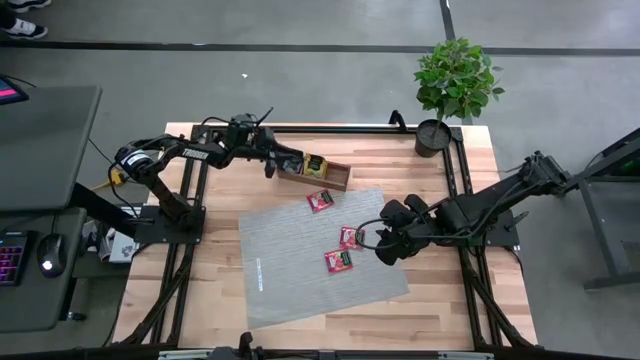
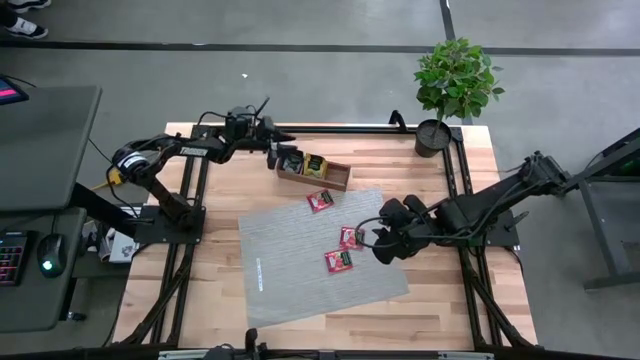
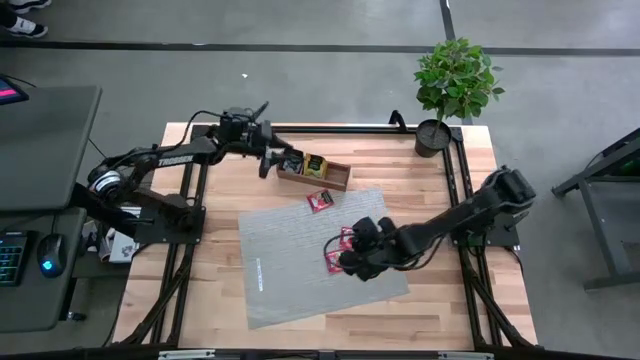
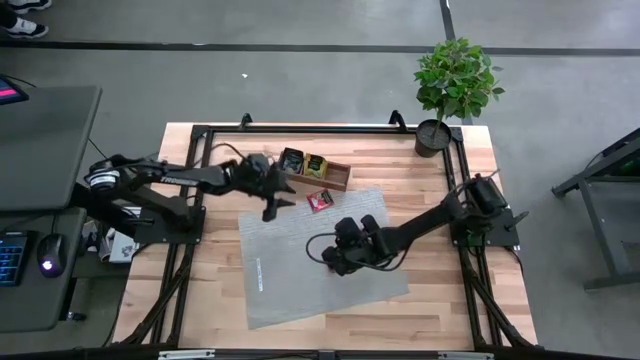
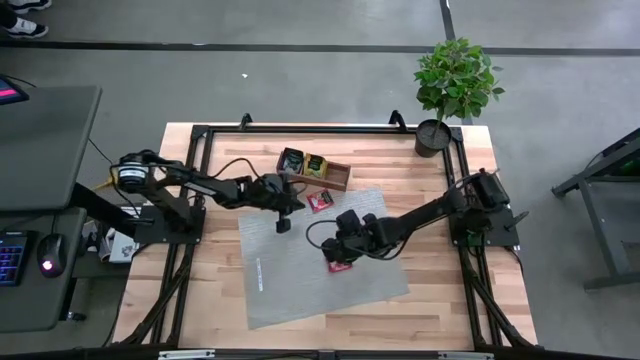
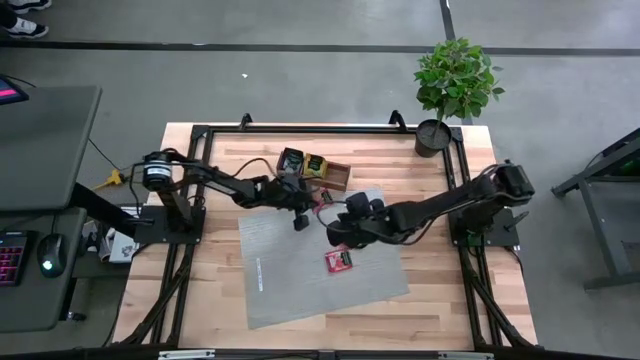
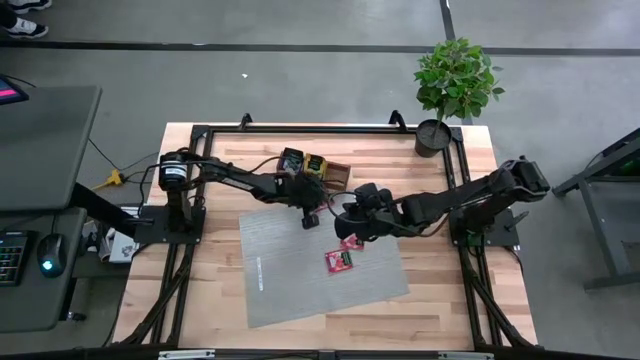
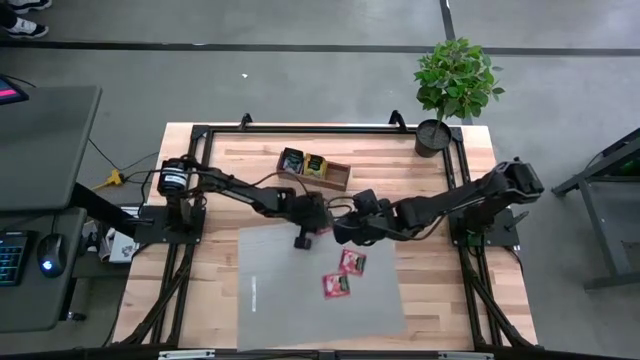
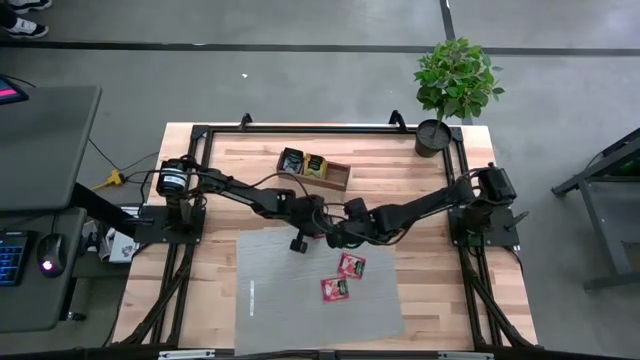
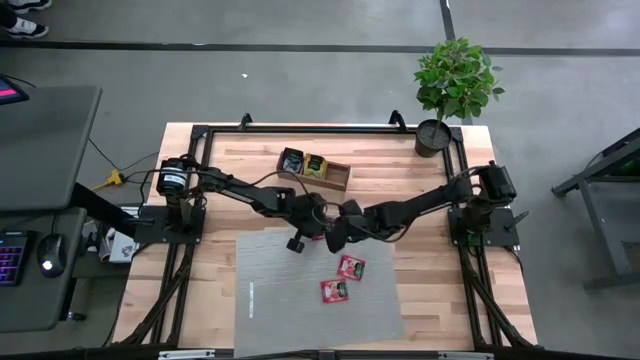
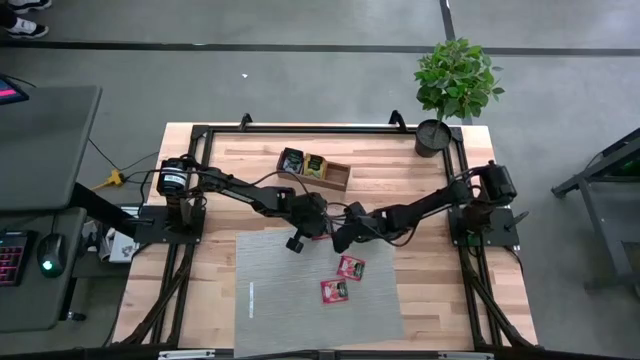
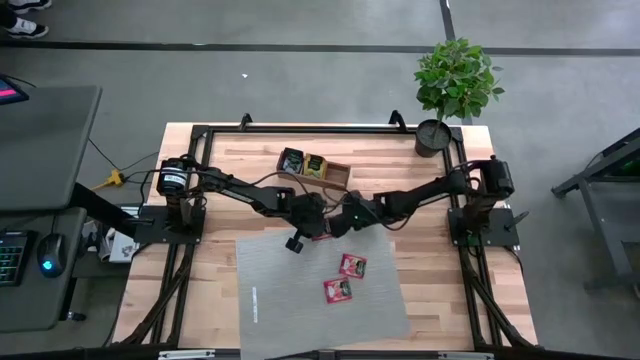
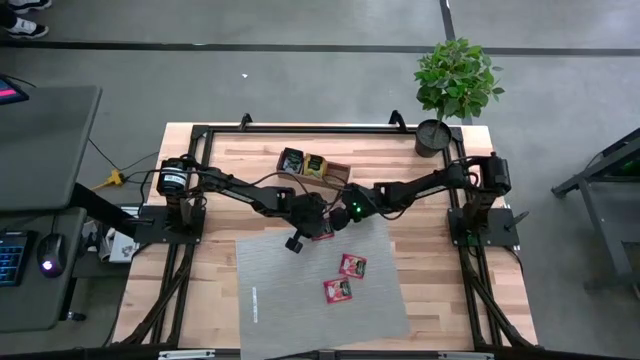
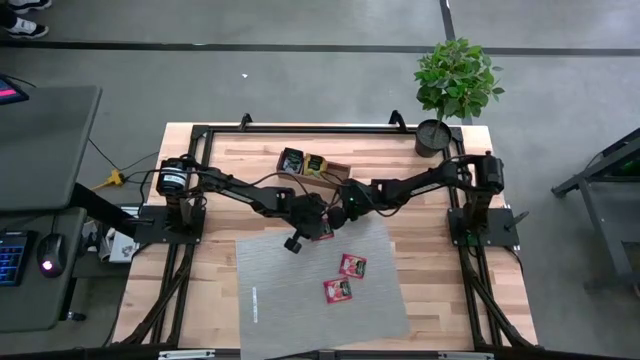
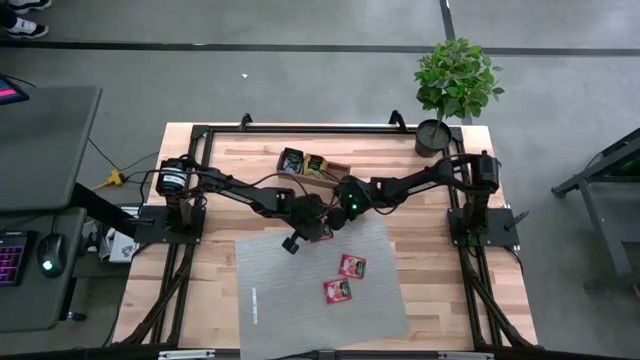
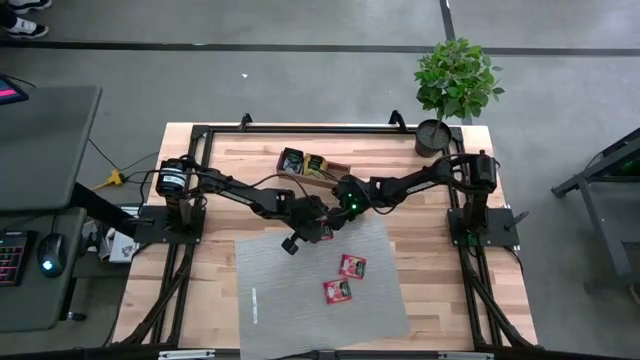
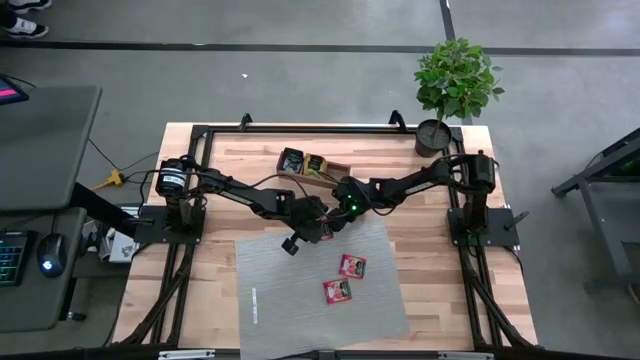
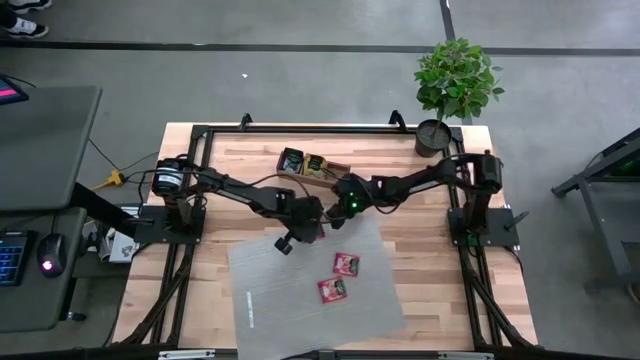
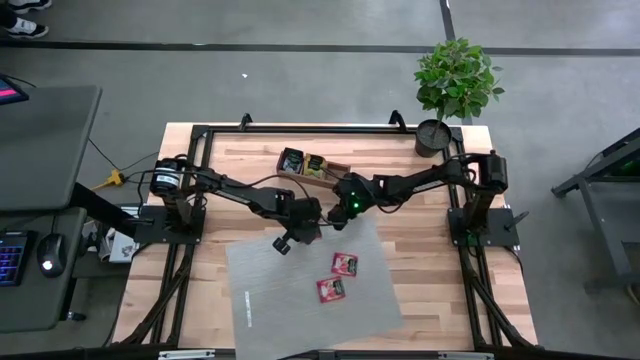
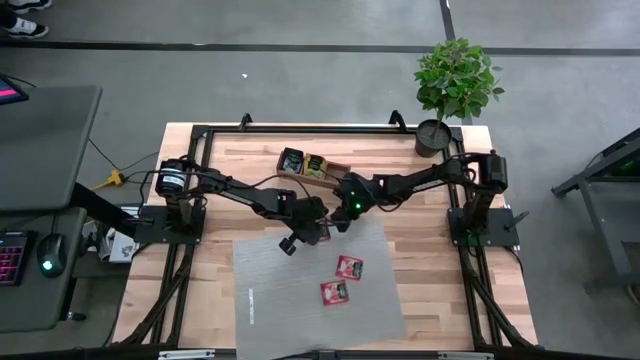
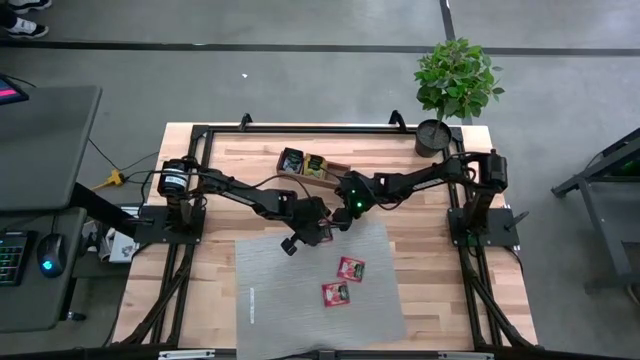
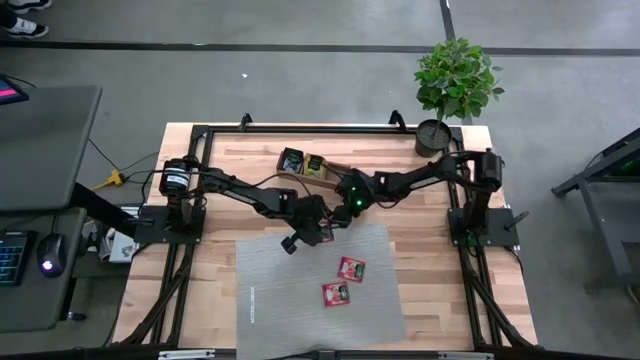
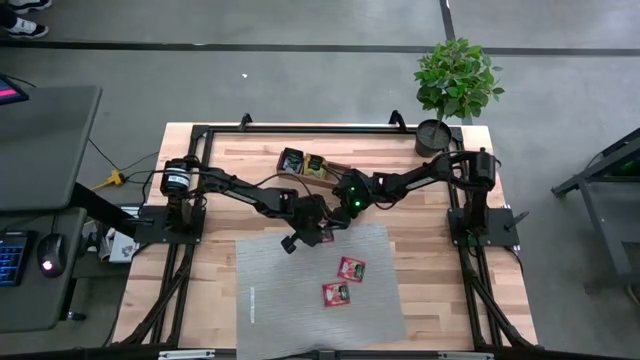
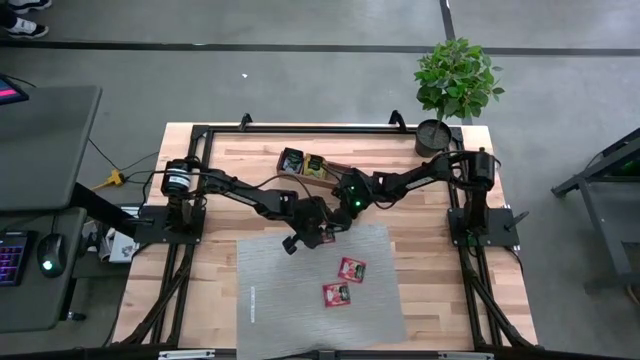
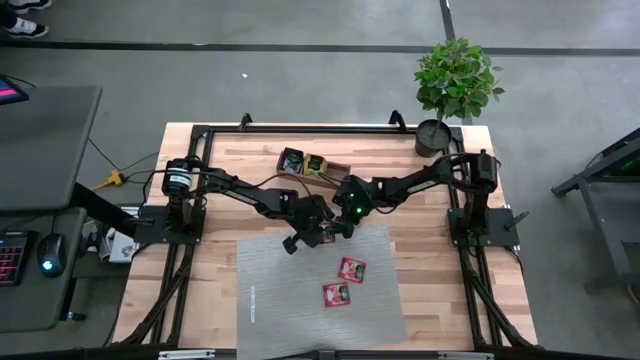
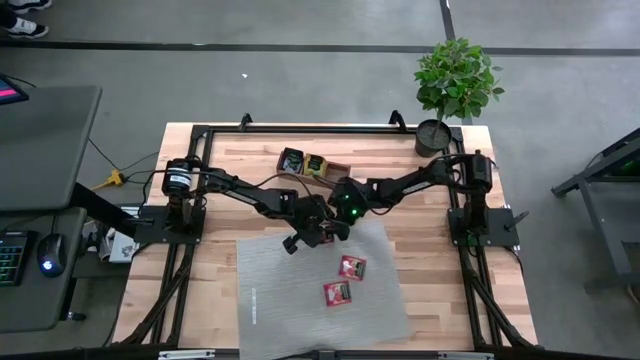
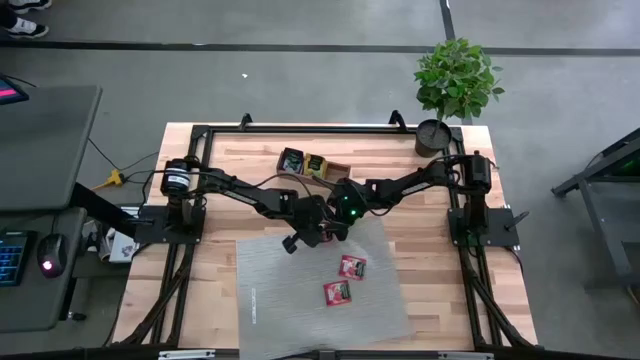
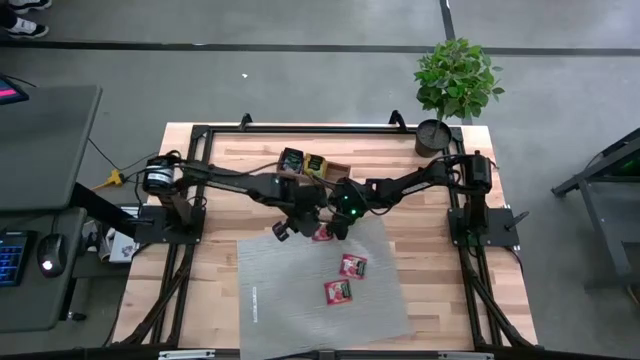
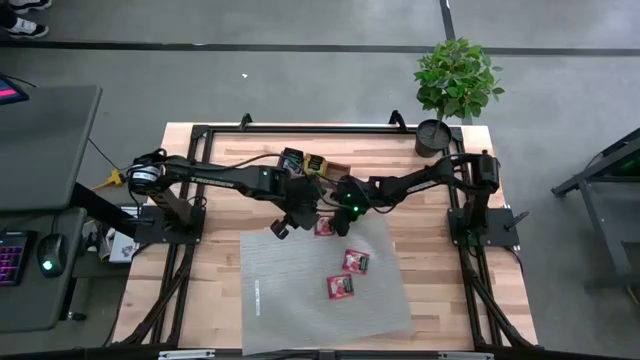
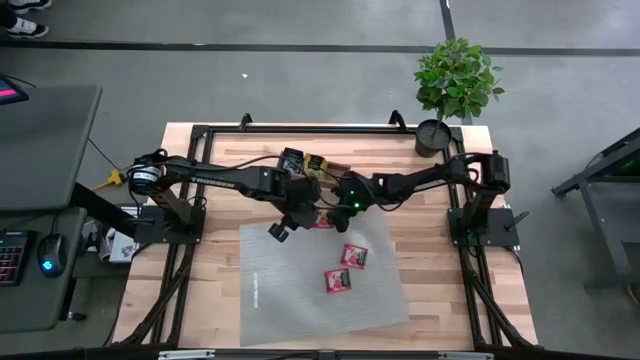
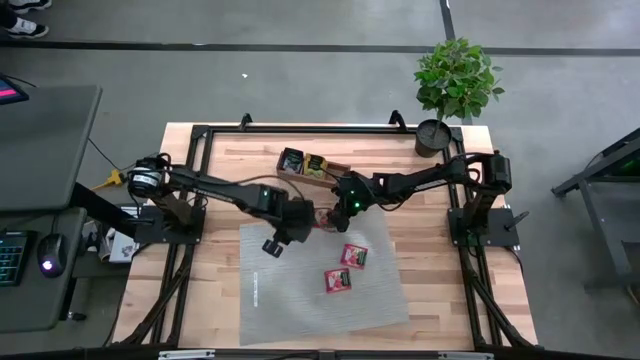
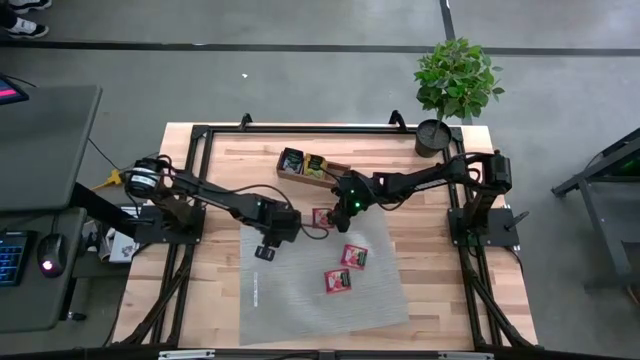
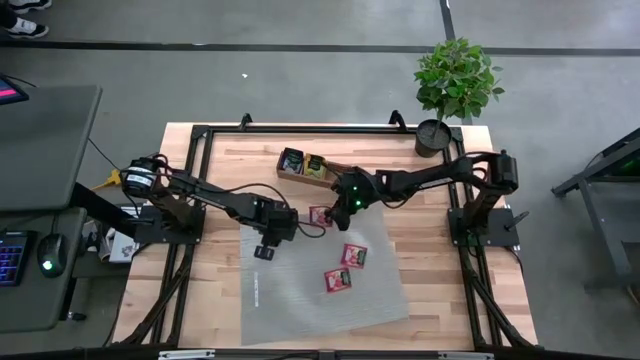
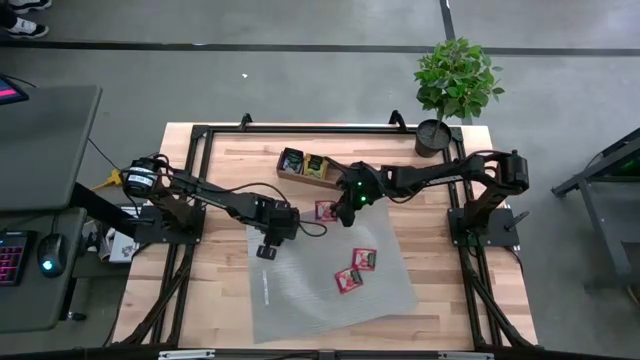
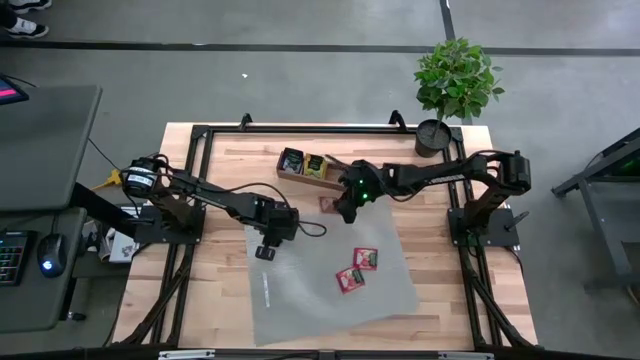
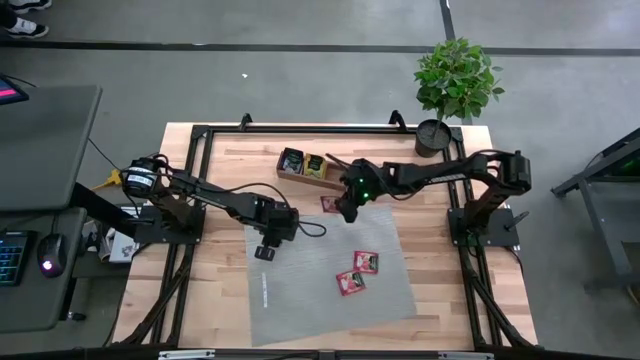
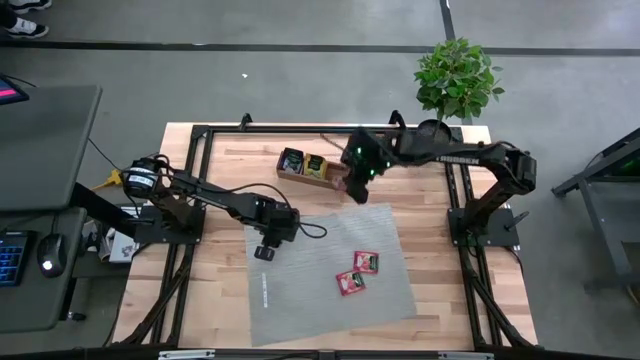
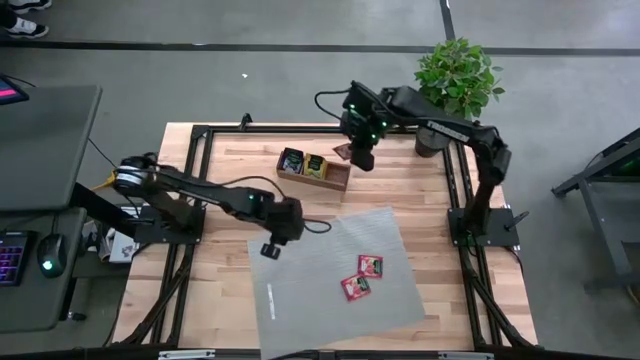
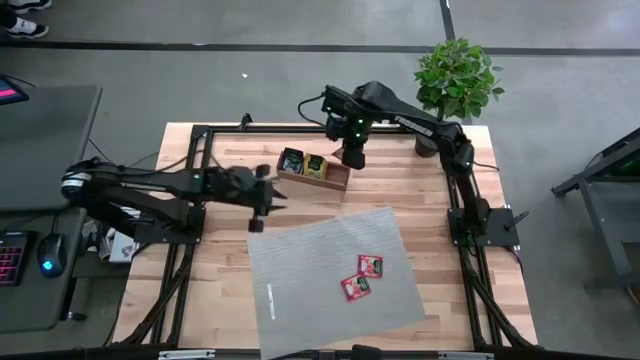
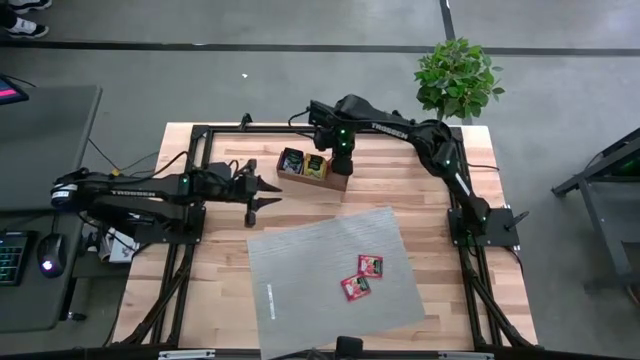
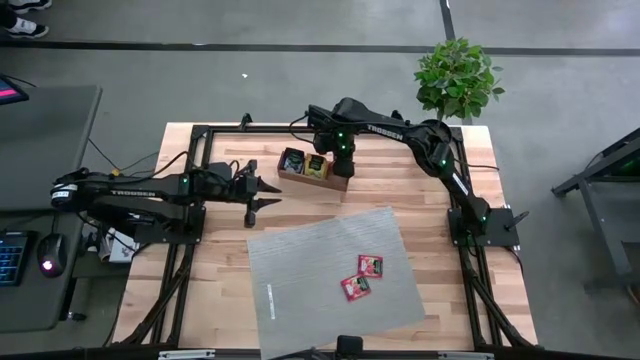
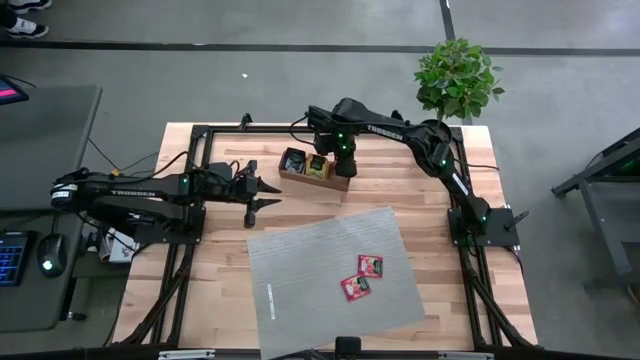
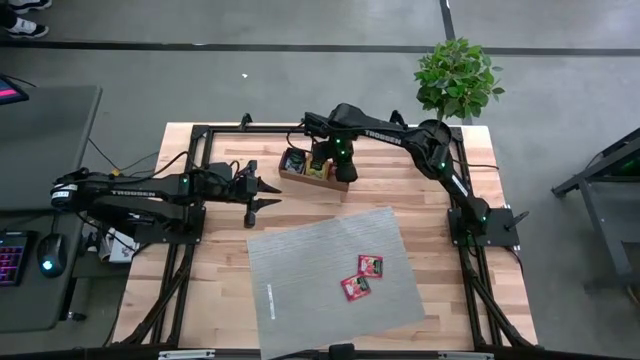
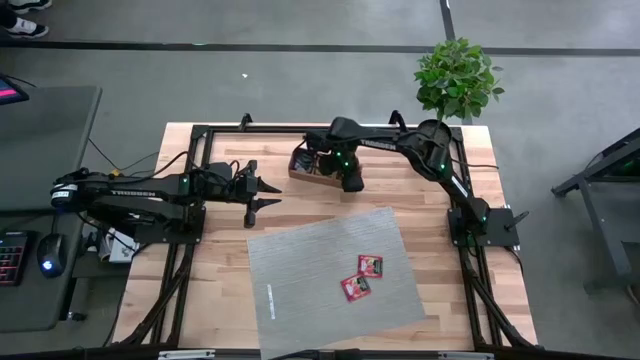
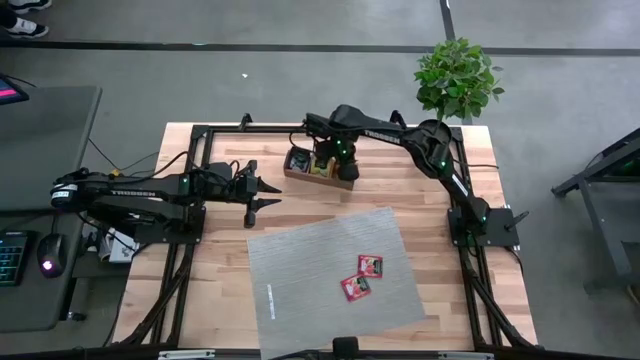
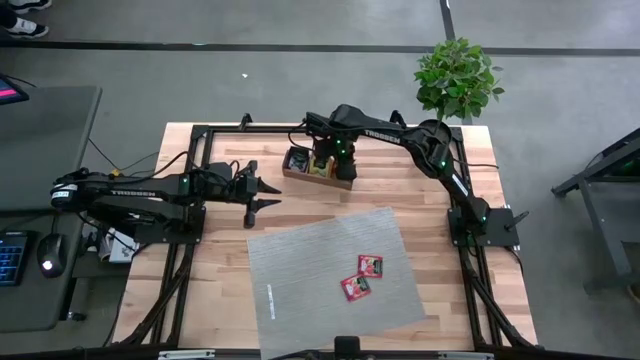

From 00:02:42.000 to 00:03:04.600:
Task: Pick & Place Tea
Put the red tea bag into the right section of the wooden organizer
